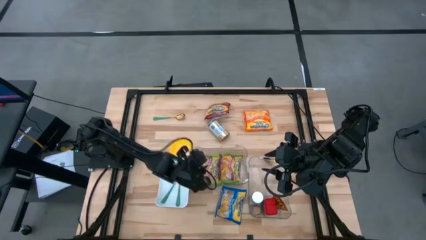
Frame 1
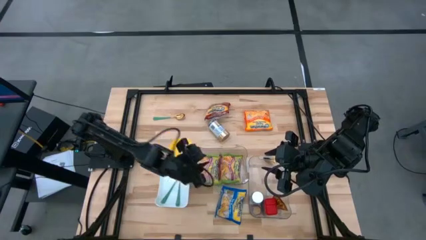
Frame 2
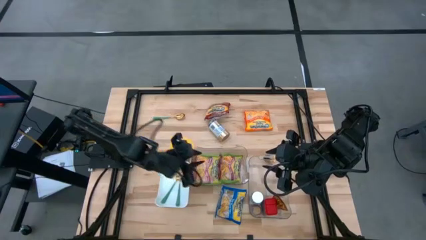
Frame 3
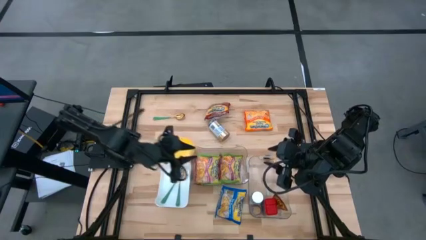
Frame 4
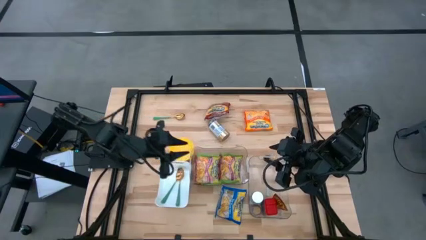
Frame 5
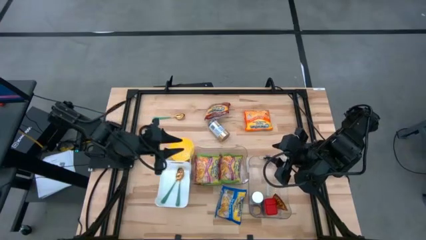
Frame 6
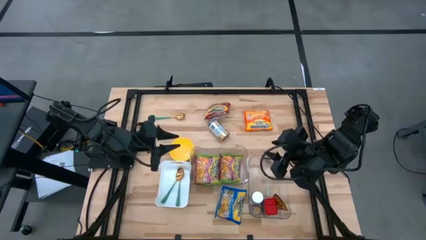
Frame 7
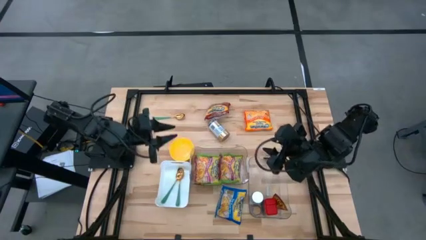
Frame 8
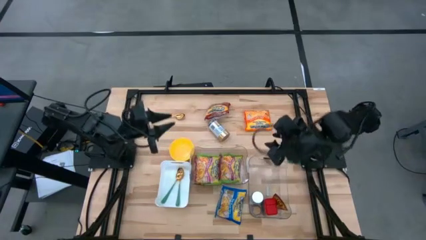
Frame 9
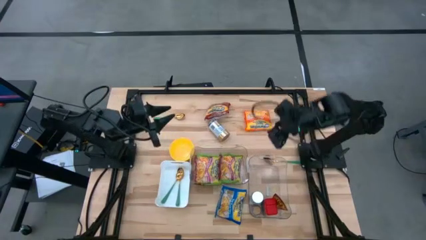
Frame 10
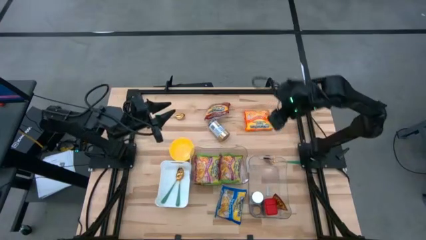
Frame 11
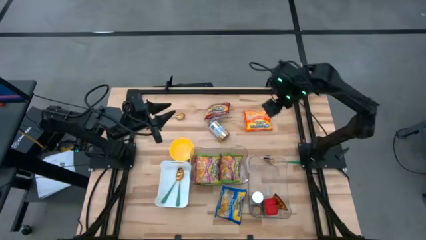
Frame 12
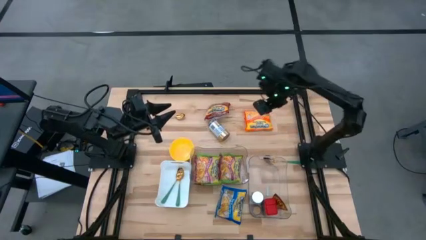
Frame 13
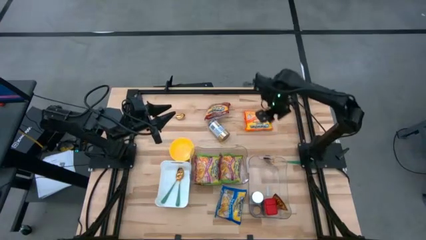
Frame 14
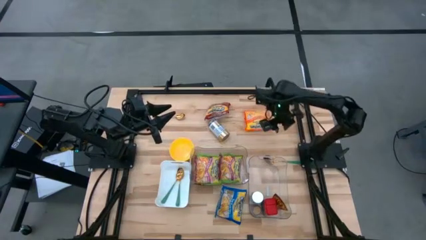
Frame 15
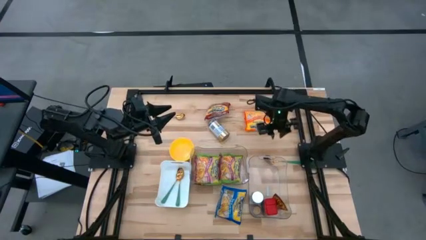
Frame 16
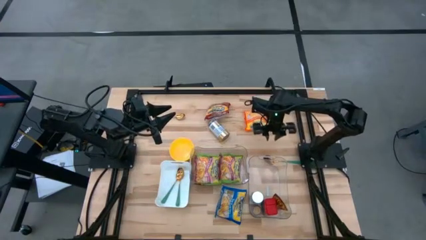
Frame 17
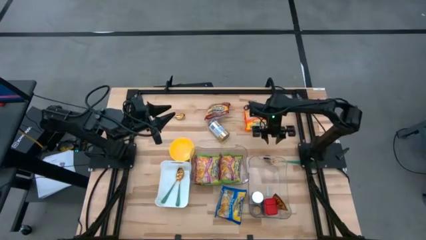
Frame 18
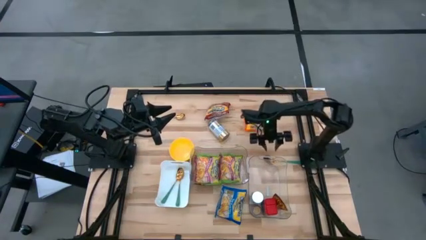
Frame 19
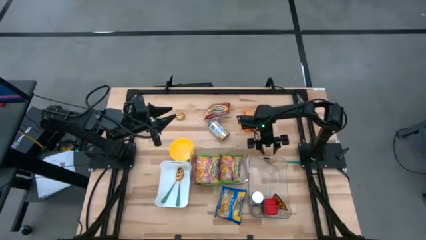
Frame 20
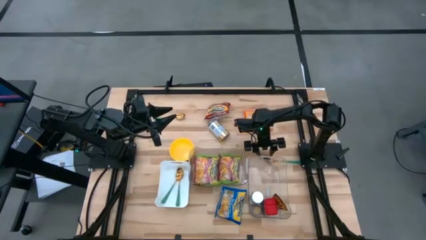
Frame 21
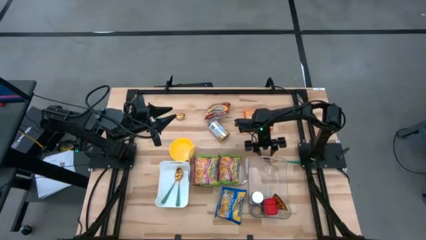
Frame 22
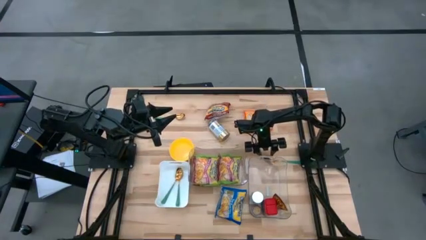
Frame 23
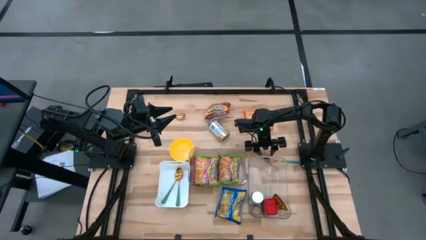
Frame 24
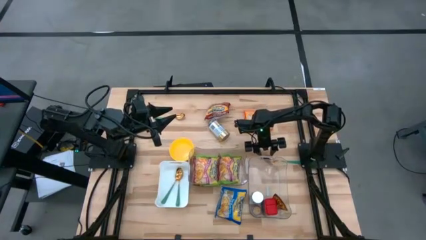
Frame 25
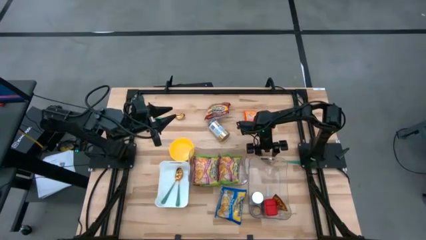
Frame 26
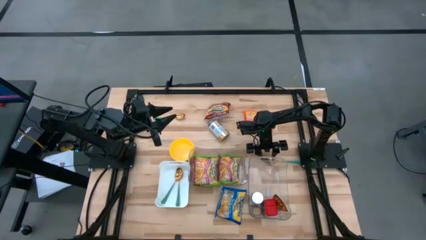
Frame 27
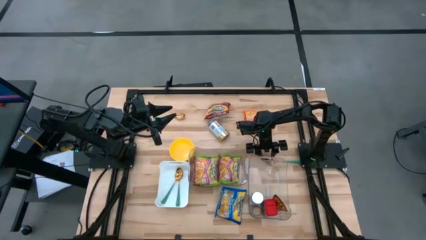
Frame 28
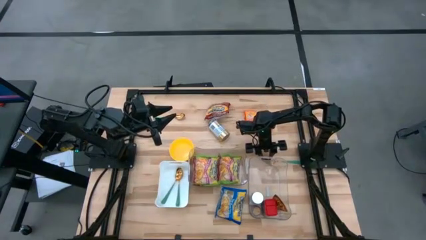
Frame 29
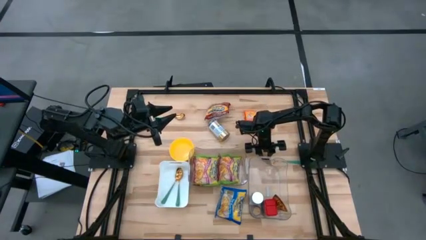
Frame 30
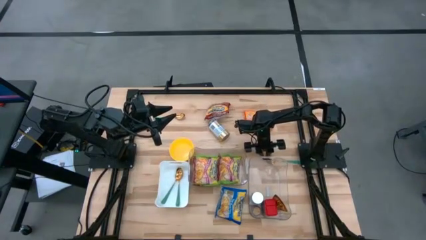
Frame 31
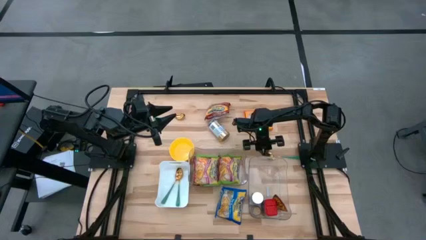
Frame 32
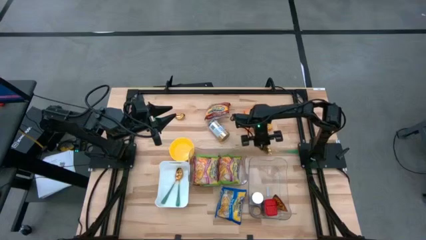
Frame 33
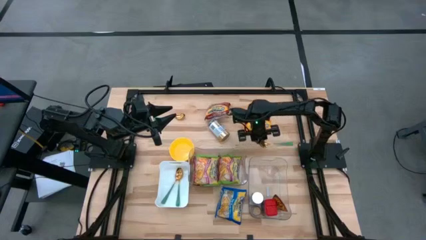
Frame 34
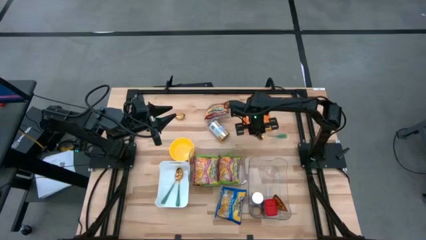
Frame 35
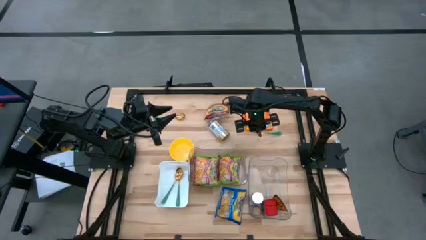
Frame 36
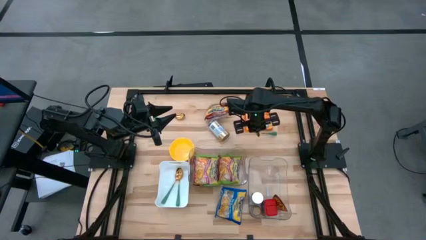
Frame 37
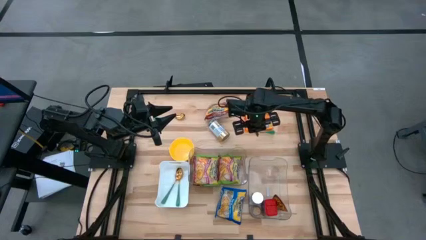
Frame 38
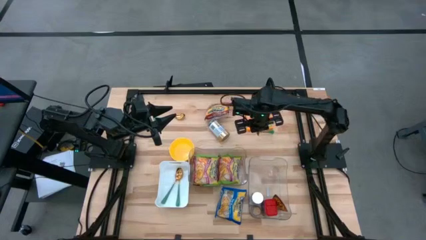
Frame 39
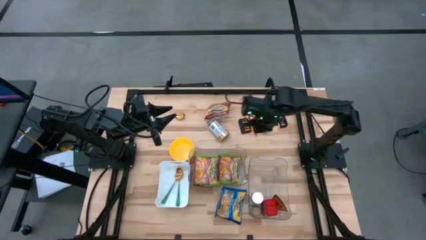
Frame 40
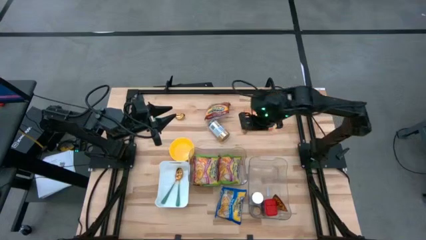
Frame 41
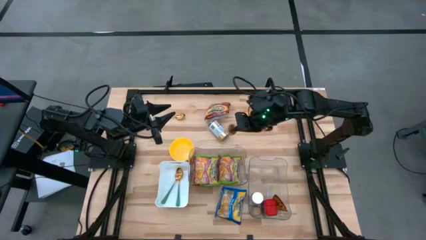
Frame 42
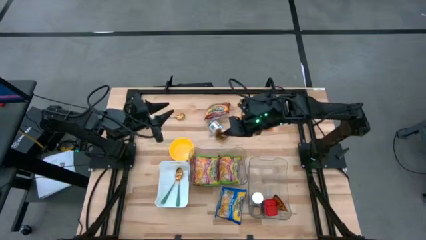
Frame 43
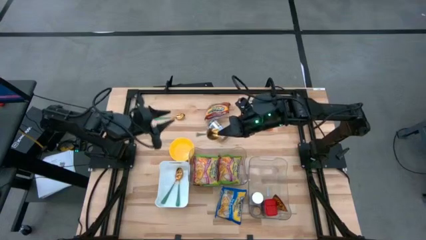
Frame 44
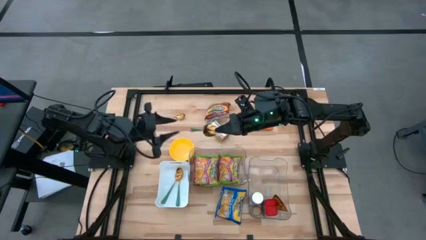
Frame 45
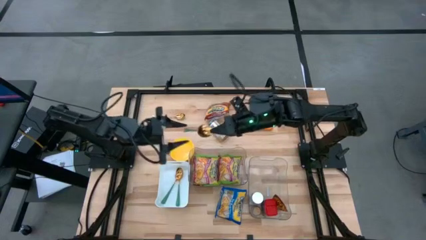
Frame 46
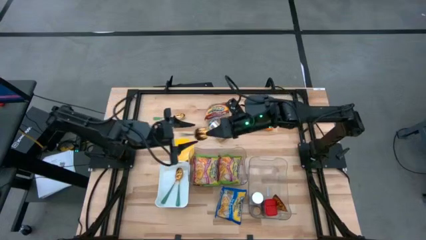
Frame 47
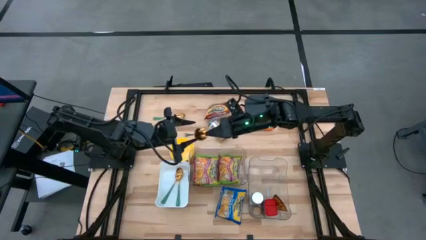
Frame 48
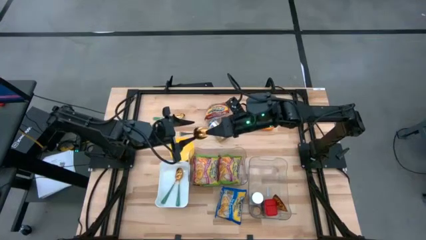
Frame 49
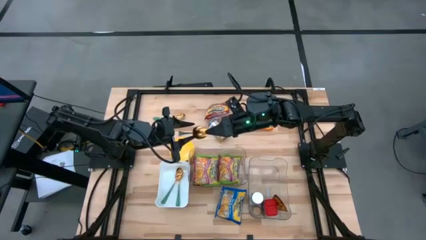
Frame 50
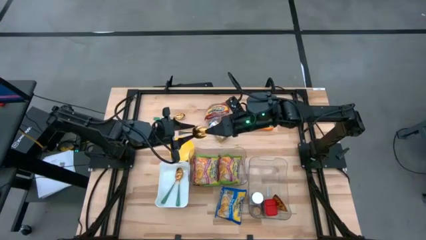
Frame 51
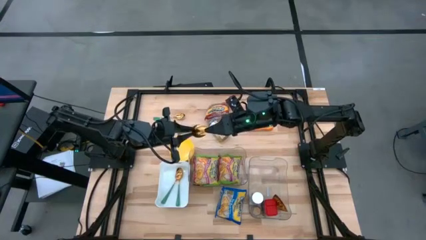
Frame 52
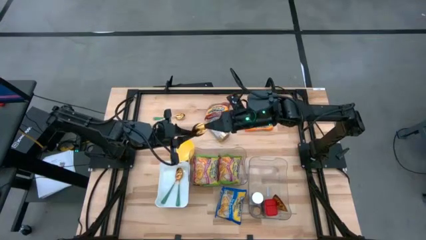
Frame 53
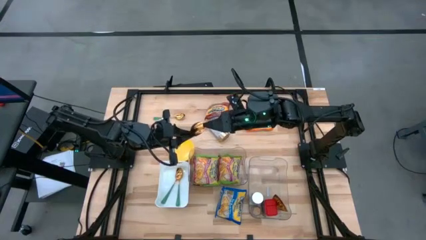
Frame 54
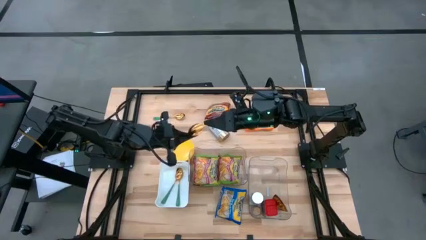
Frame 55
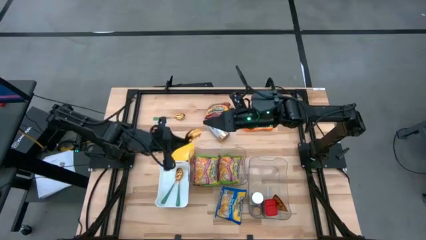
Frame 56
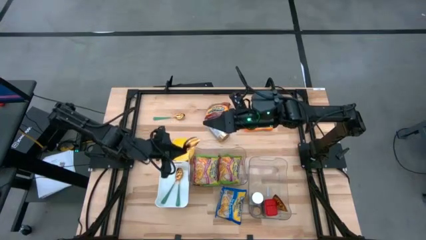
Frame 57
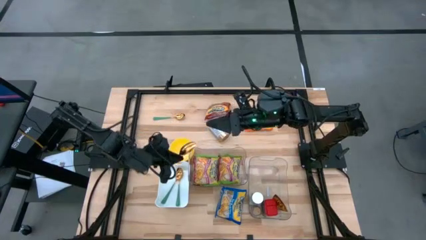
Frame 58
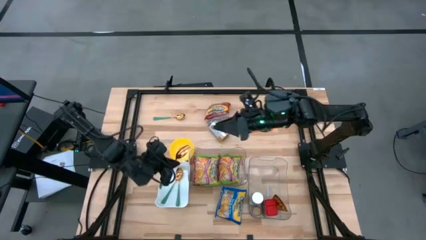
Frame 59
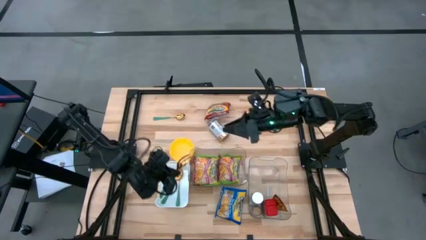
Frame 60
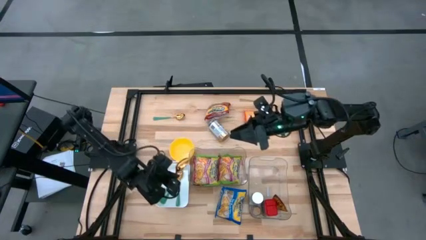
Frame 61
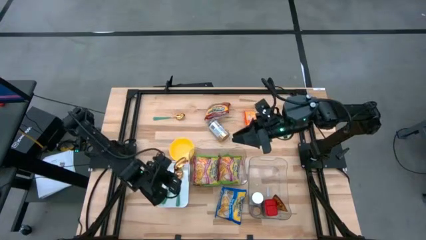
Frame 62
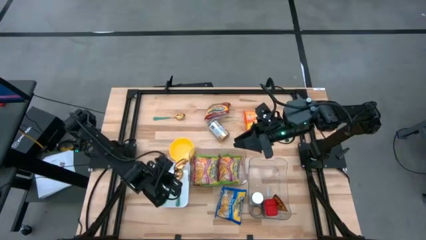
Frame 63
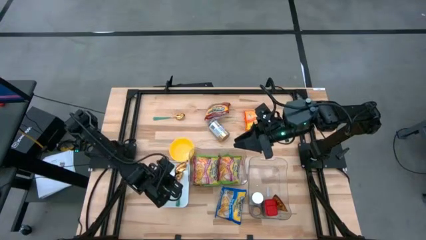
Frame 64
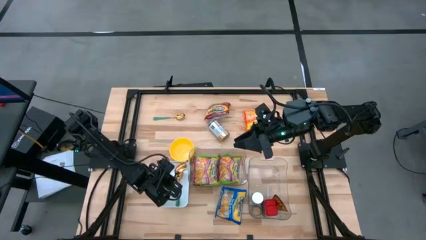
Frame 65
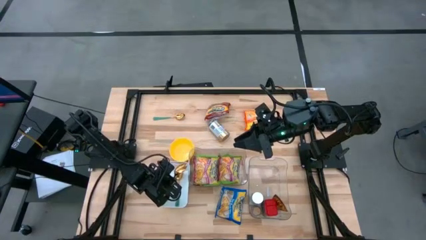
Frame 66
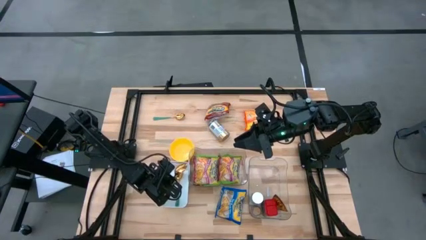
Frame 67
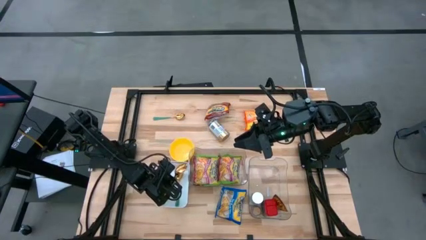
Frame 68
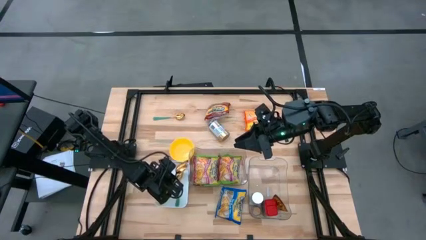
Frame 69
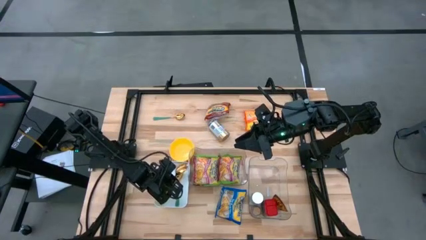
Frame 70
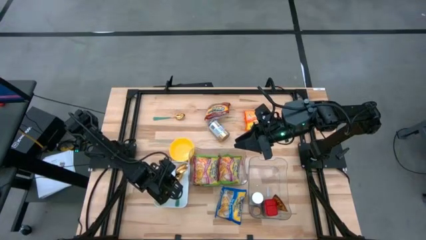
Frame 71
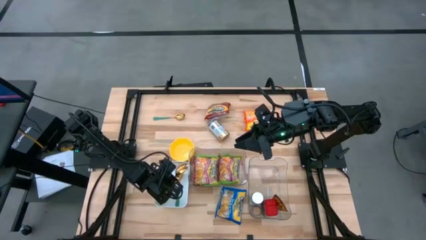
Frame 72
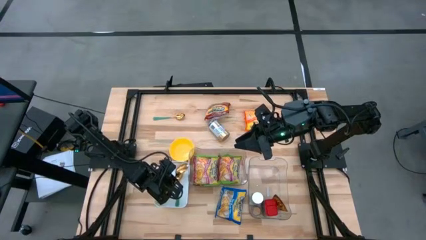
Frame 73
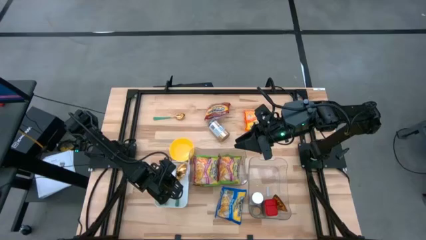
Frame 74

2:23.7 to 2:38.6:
Task: Pick & Place Food Item
Put the green spoon into the white bin

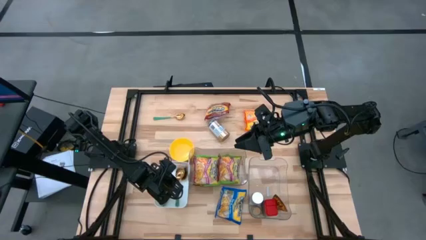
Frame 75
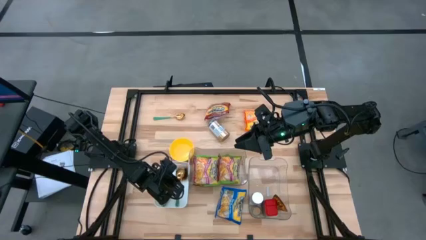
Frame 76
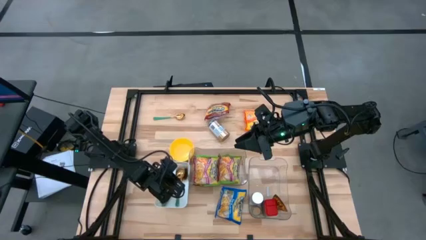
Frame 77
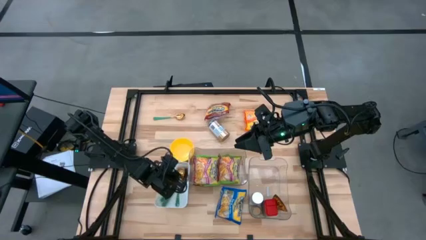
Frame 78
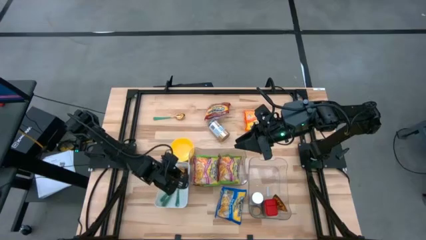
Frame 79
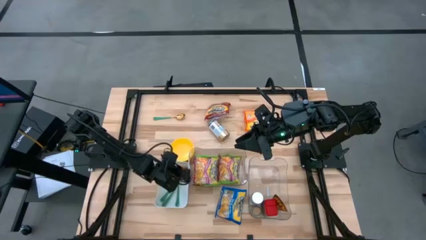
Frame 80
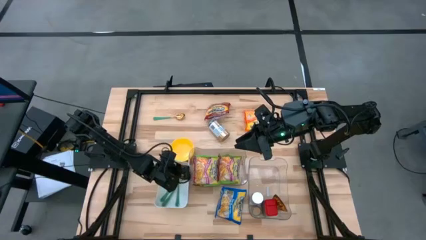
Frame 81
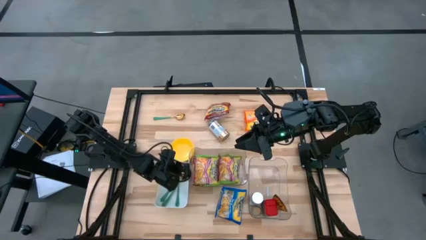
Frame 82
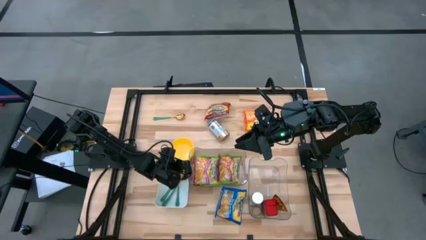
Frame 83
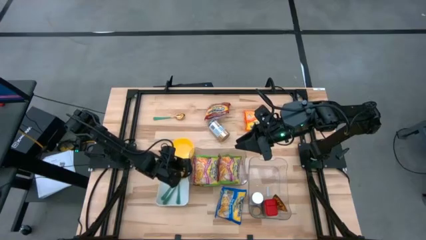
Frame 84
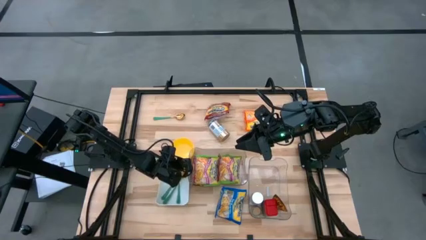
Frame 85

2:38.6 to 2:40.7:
Adjust the white bin
